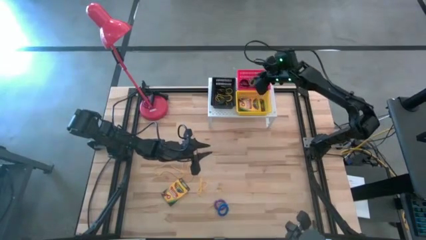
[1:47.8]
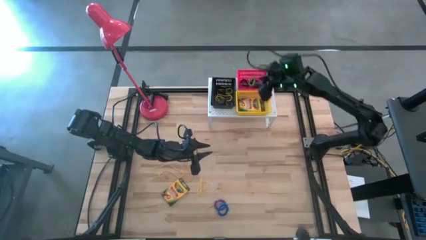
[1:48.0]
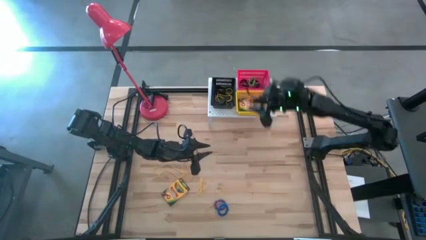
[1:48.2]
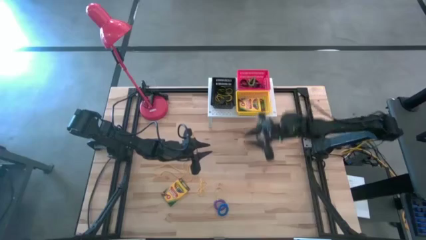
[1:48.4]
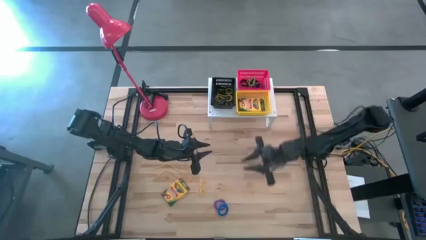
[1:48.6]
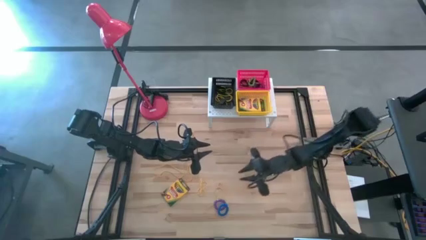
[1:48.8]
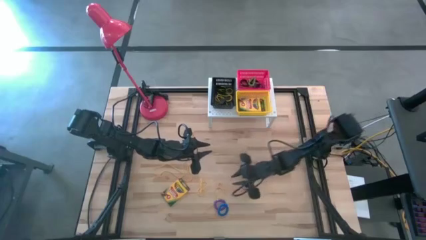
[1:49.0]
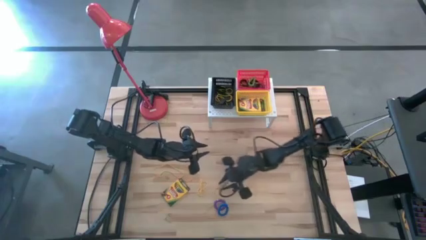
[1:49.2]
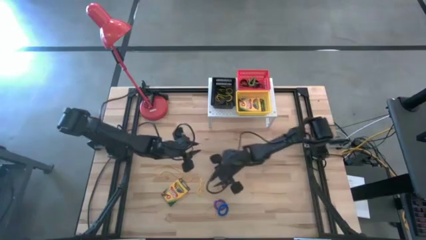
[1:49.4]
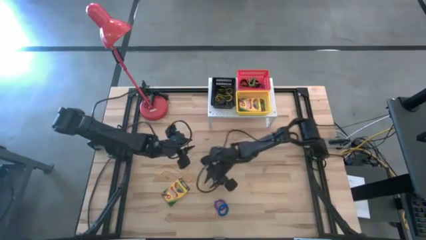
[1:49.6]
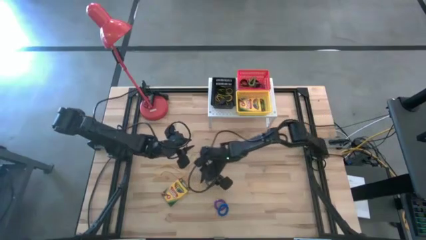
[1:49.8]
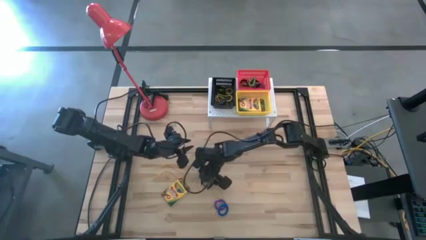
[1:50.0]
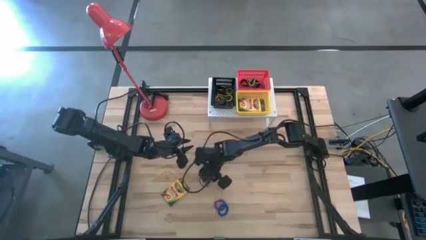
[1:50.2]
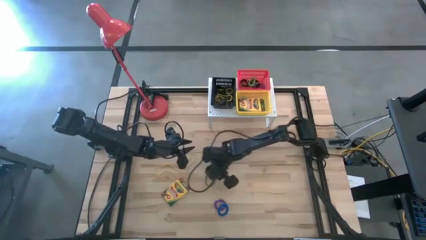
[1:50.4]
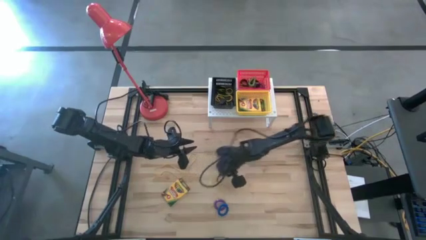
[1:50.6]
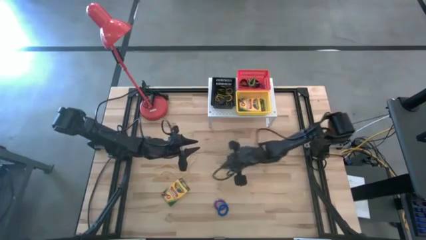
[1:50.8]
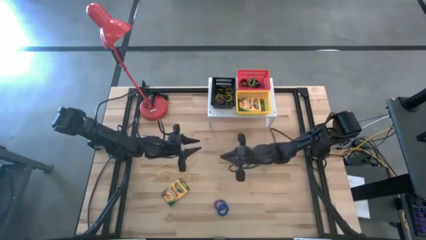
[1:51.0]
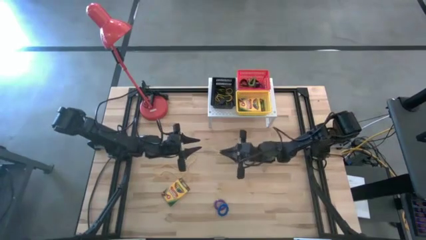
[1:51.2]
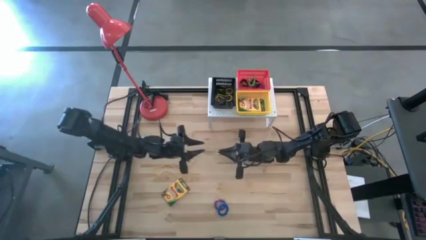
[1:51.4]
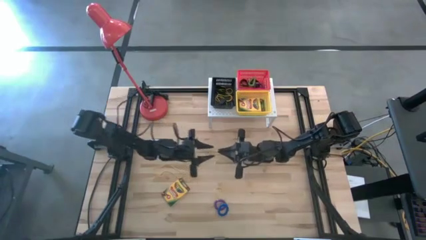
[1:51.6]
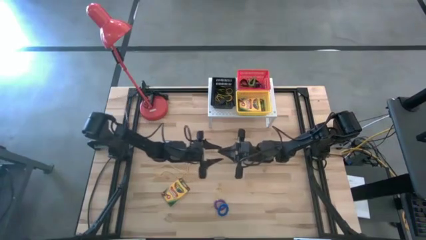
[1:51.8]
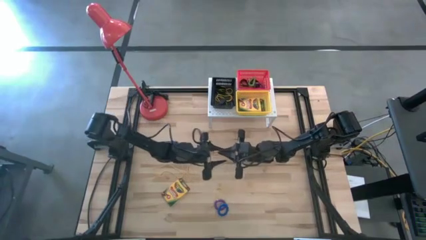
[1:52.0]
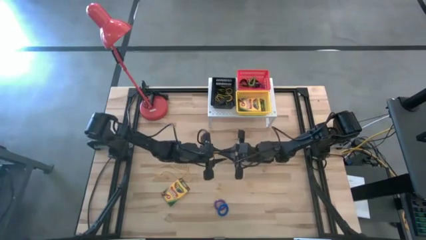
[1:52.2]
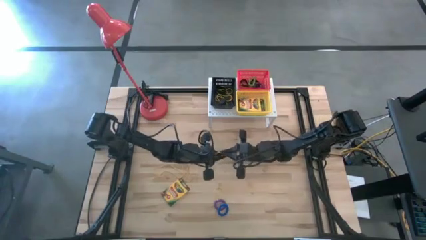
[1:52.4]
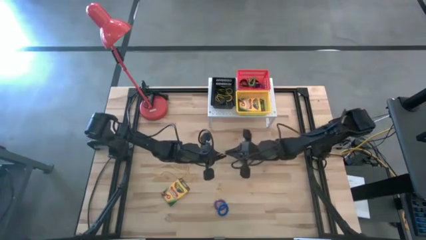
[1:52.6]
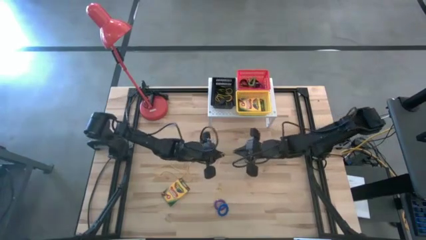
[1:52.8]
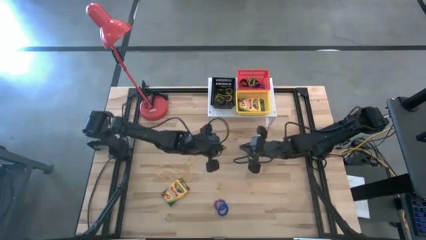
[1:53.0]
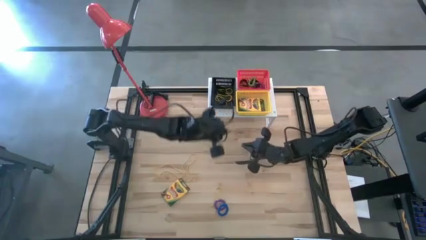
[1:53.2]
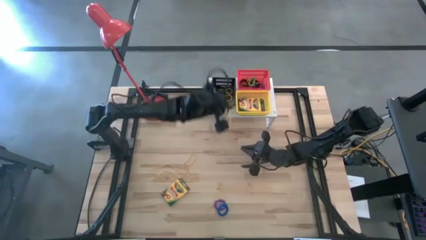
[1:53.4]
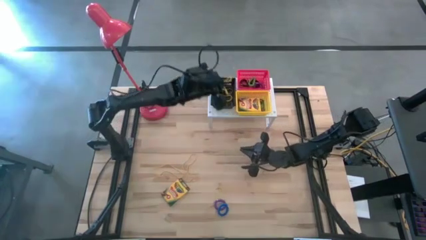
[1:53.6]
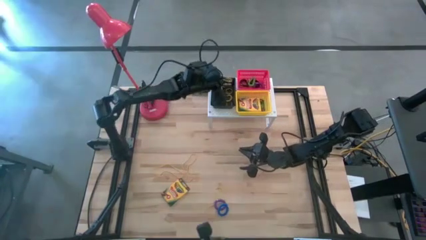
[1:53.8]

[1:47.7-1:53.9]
Task: Pick & Place Office Desk Supplies
Put the yellow rubber band into the black bin on the shelf

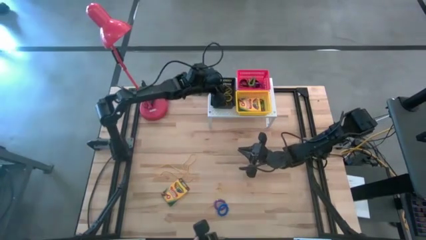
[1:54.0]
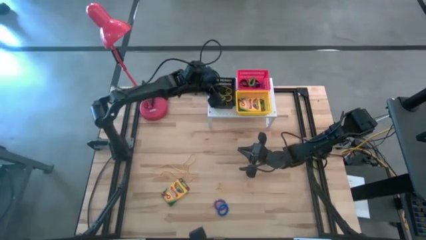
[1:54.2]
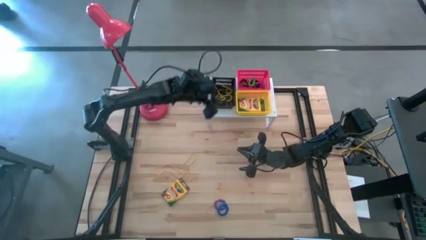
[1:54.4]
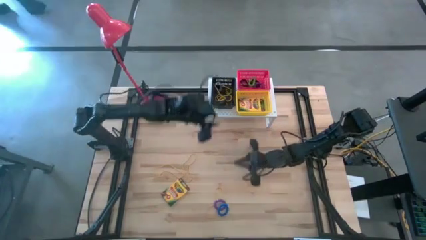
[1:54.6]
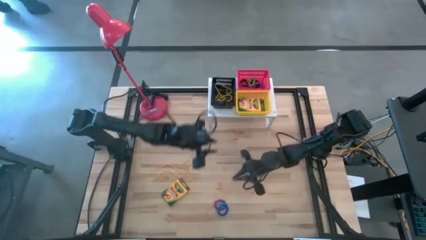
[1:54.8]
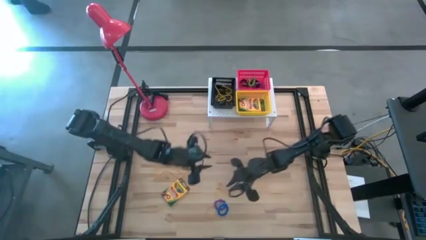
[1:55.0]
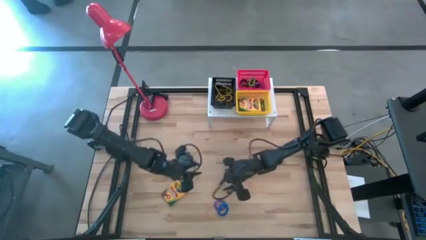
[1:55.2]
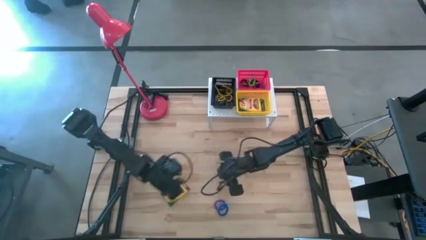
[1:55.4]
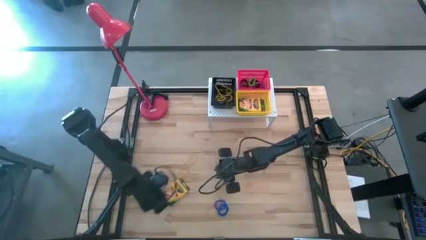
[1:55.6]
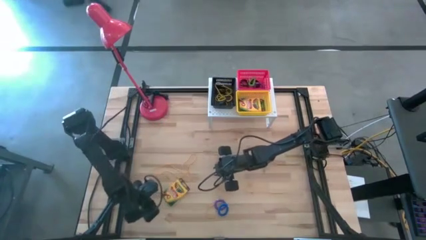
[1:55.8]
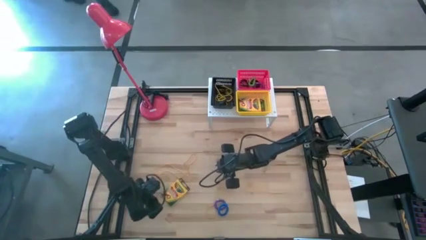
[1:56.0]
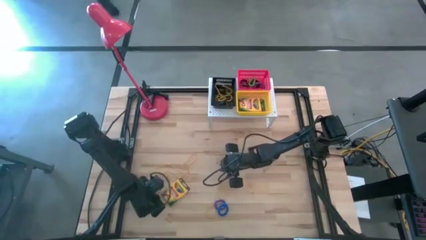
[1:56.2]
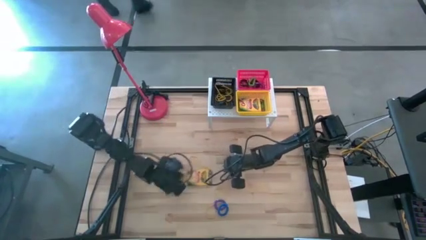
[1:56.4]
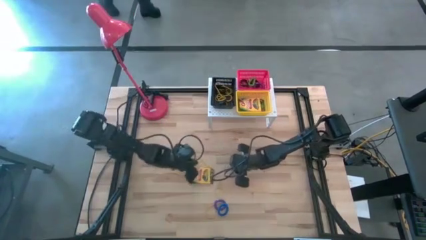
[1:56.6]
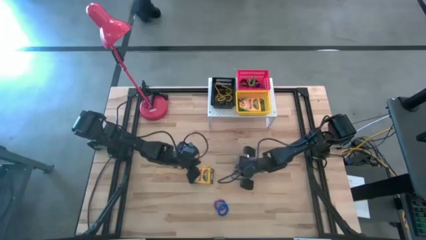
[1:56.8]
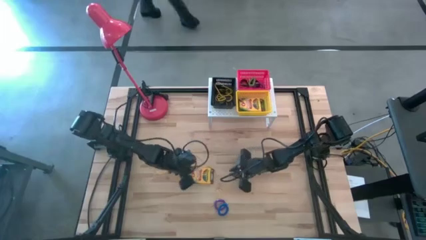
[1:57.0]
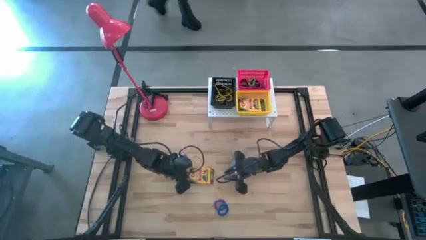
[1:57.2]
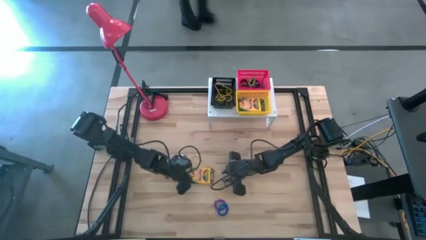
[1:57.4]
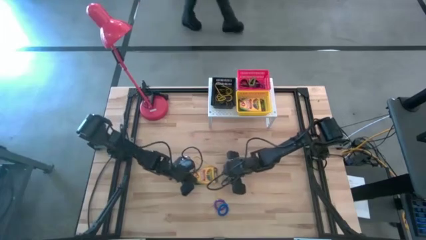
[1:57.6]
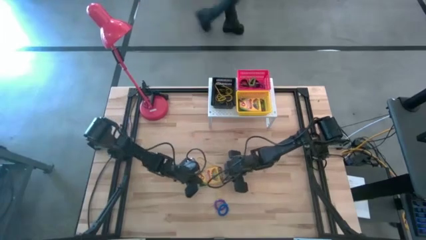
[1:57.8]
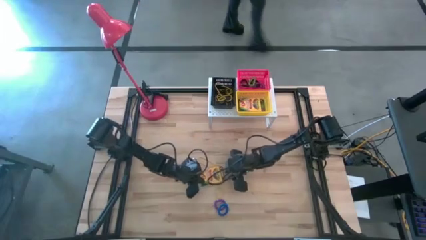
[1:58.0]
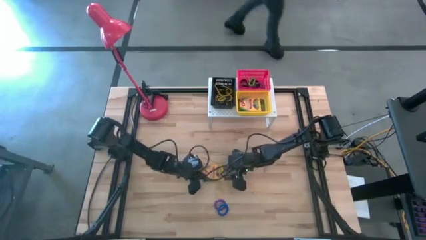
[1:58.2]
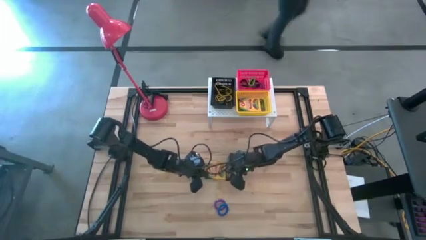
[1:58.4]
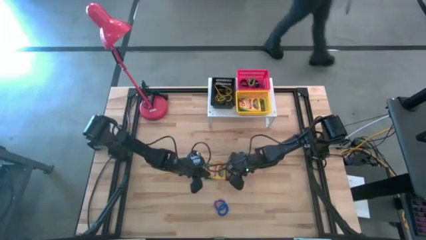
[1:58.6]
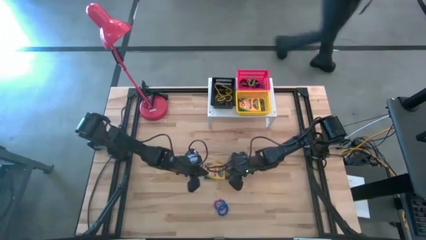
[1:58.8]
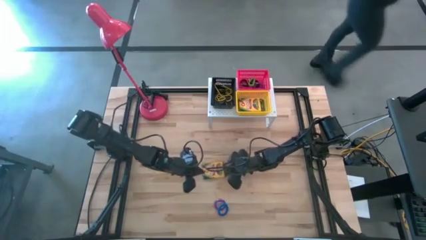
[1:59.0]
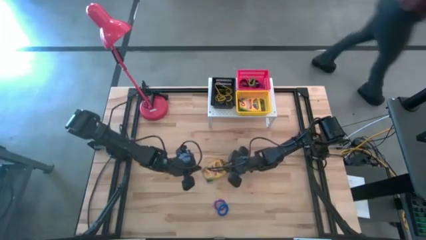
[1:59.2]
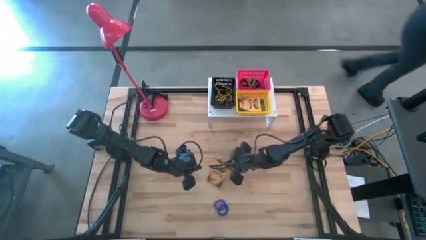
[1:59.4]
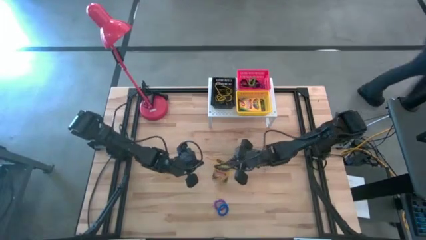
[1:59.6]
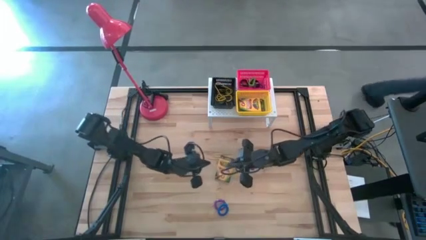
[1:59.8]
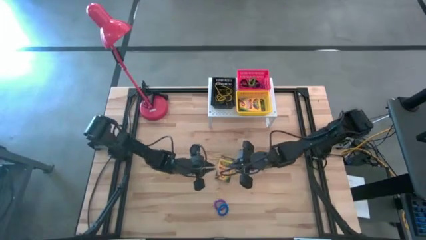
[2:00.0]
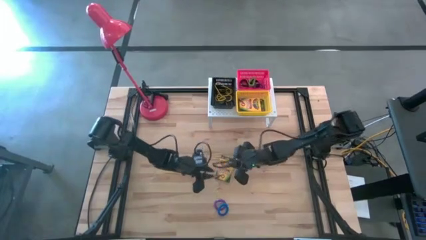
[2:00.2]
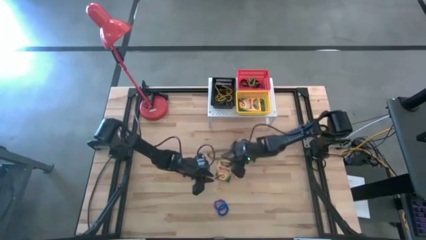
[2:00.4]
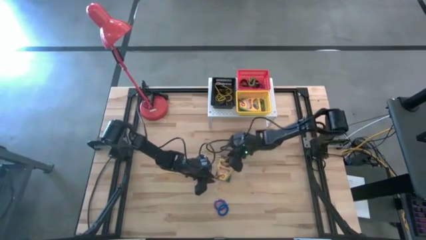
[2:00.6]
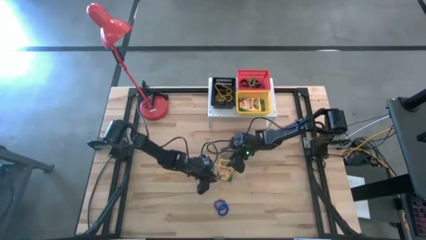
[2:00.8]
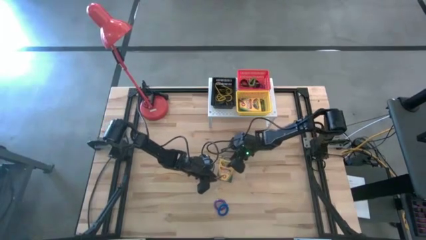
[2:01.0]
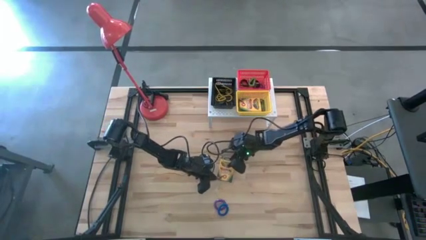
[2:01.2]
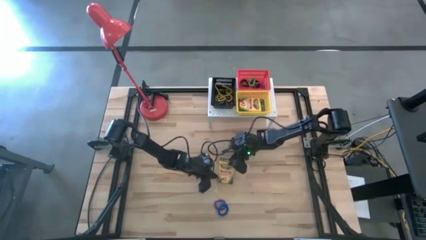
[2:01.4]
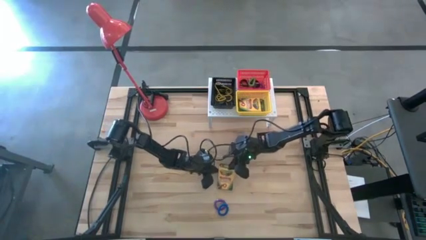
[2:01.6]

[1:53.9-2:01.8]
Put the yellow crayon box into the yellow bin on the shelf

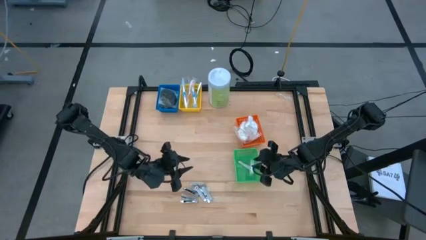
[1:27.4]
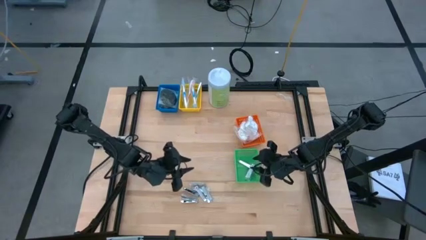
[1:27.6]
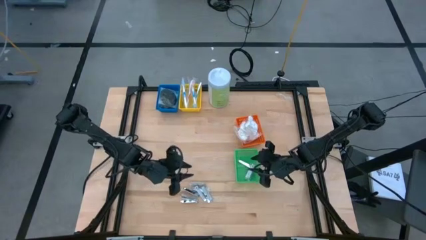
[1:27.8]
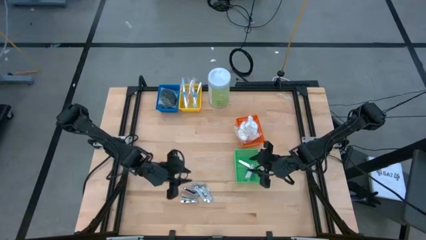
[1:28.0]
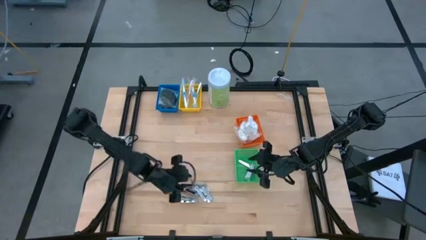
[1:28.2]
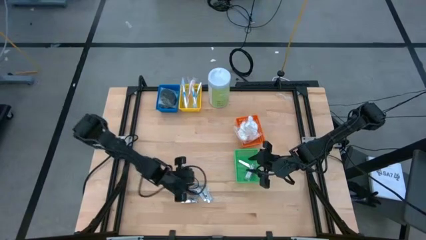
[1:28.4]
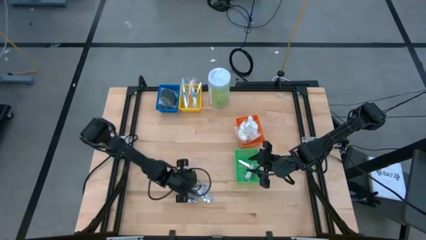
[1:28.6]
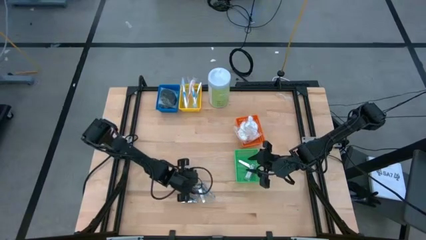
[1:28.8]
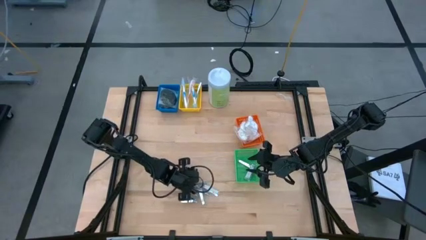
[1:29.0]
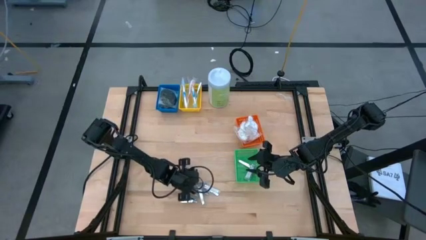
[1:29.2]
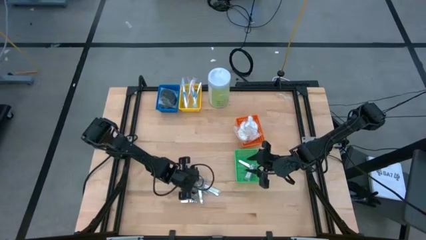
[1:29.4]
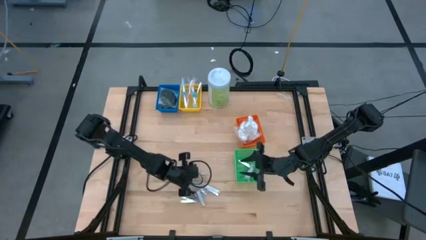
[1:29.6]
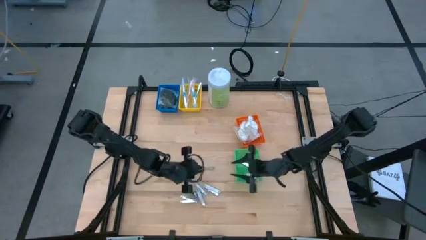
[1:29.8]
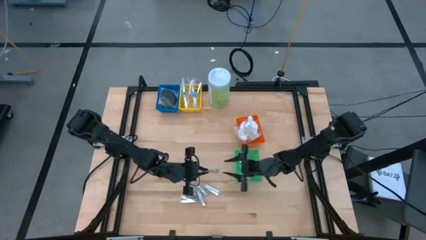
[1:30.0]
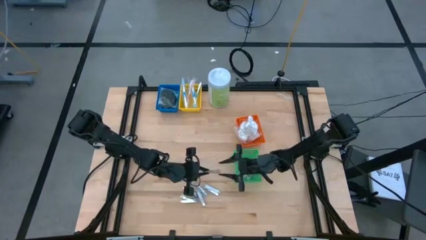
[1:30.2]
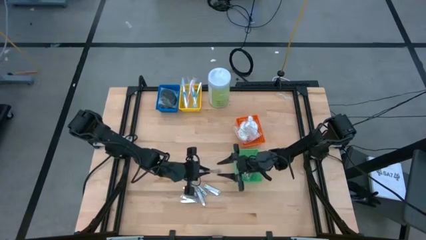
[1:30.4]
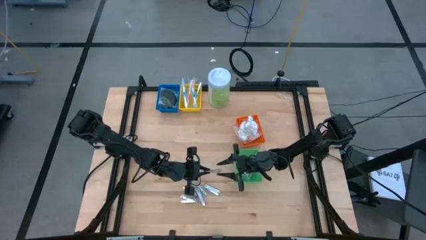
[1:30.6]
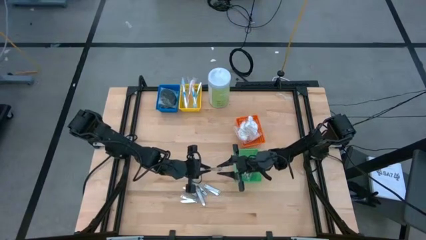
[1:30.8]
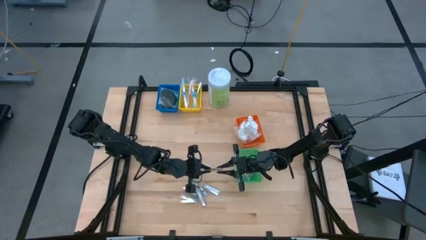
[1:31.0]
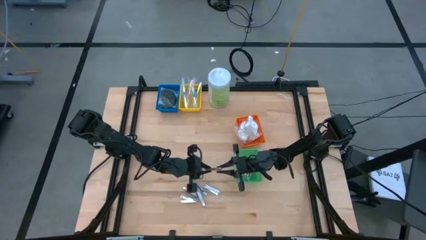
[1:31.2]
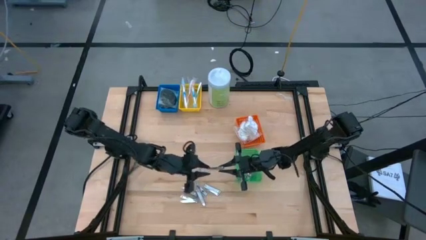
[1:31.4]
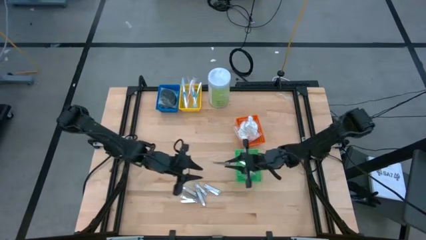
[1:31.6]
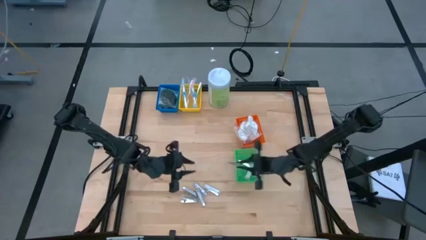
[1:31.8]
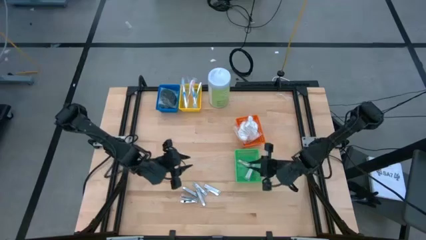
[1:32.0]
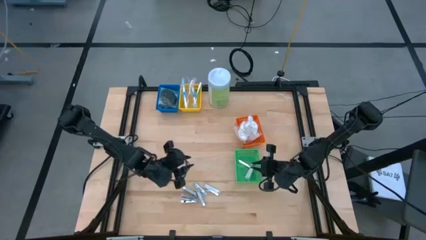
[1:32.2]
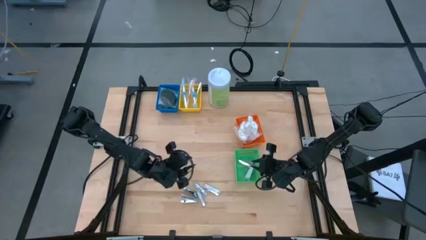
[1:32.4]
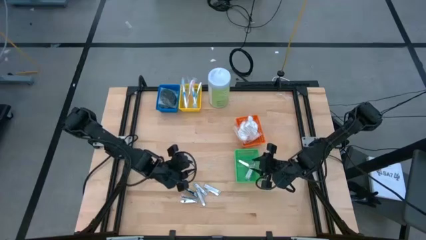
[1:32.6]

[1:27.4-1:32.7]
Task: Pick & Place Travel size toiletries
Put the nail cutter into the green bin
